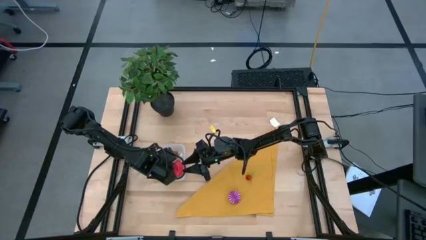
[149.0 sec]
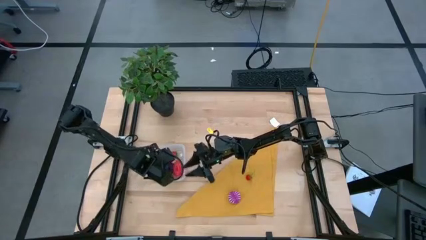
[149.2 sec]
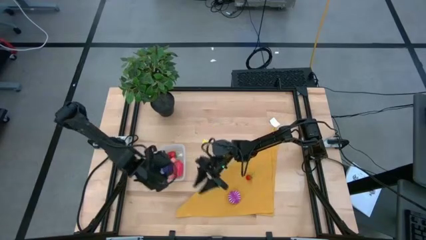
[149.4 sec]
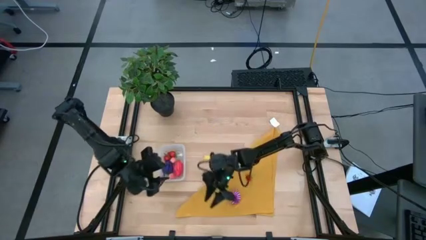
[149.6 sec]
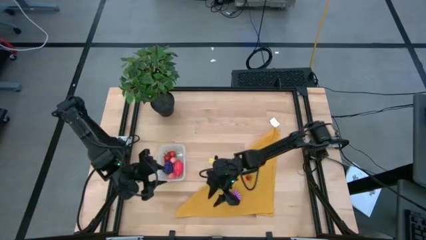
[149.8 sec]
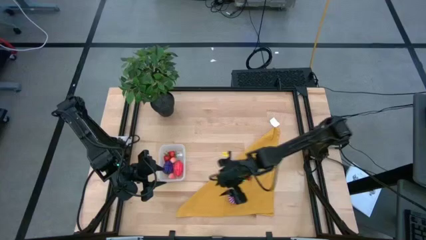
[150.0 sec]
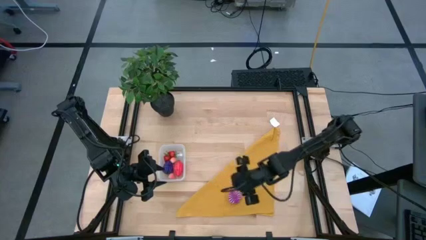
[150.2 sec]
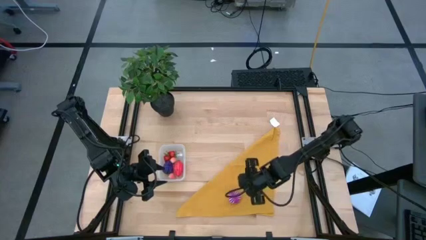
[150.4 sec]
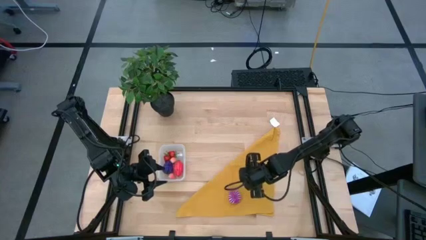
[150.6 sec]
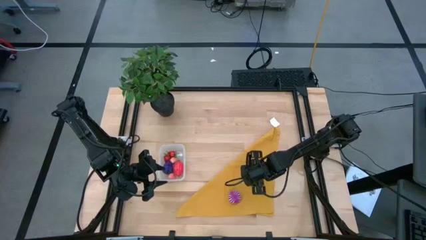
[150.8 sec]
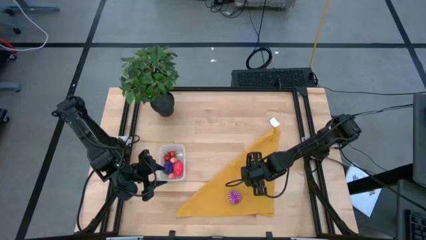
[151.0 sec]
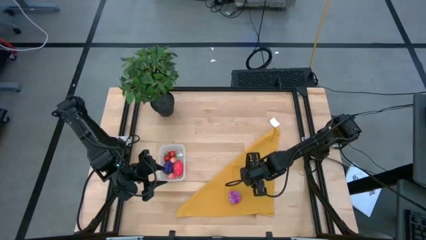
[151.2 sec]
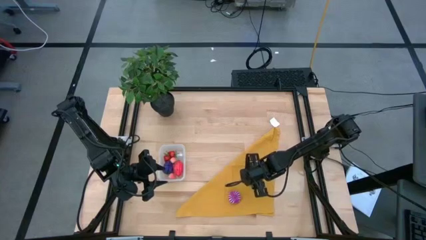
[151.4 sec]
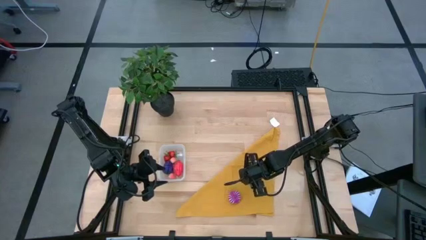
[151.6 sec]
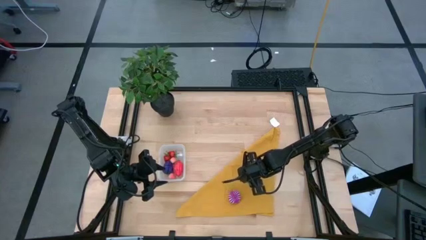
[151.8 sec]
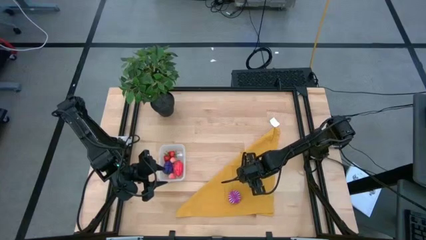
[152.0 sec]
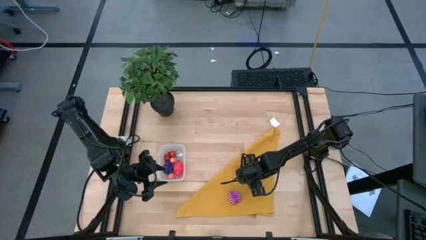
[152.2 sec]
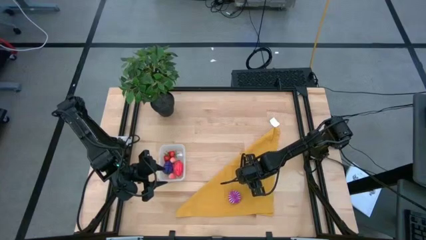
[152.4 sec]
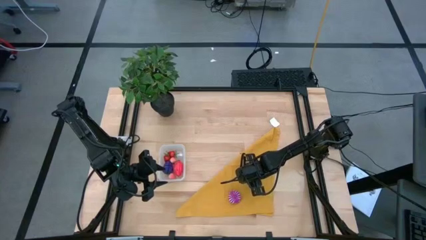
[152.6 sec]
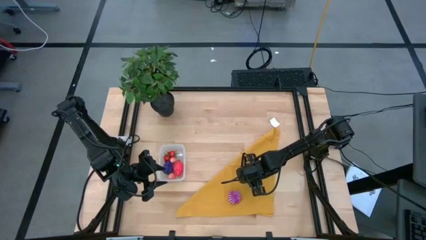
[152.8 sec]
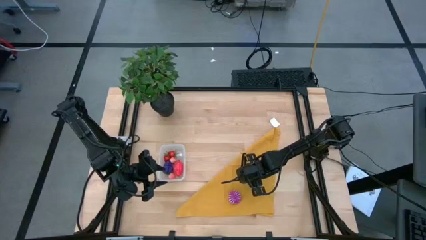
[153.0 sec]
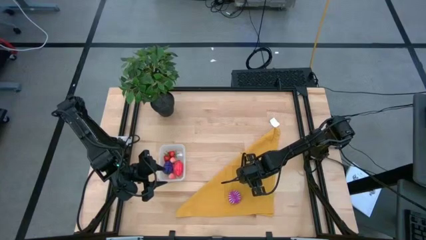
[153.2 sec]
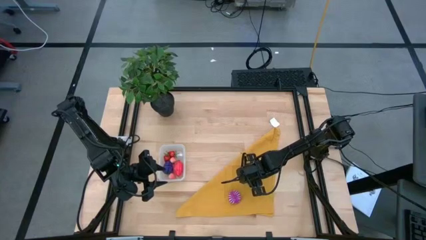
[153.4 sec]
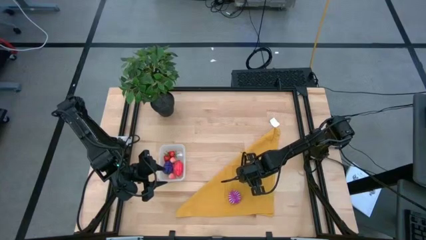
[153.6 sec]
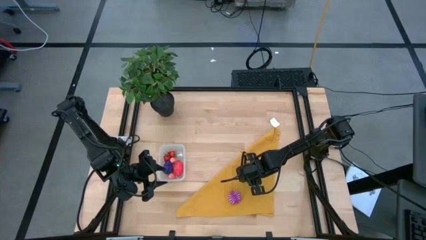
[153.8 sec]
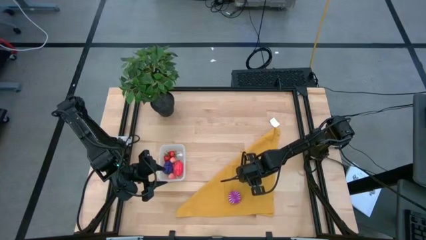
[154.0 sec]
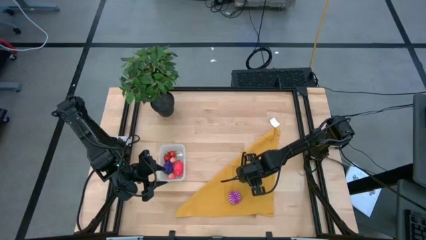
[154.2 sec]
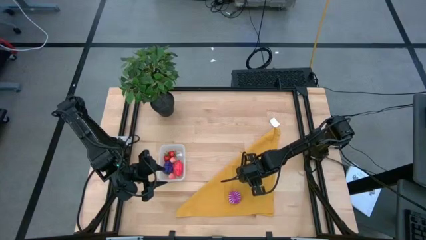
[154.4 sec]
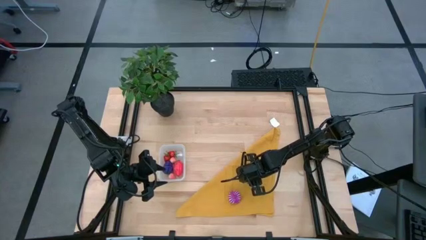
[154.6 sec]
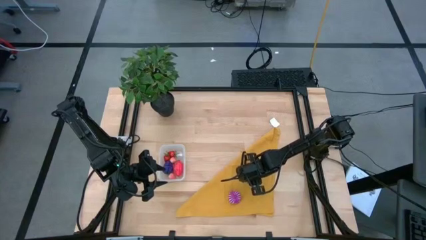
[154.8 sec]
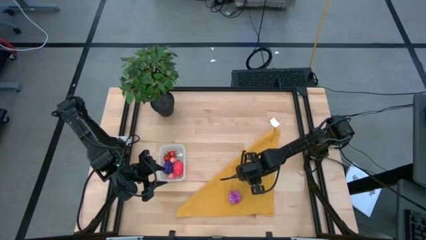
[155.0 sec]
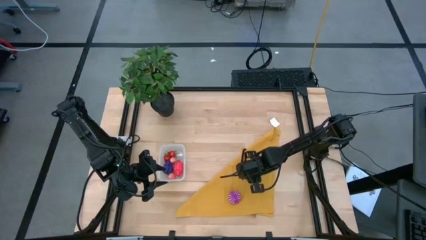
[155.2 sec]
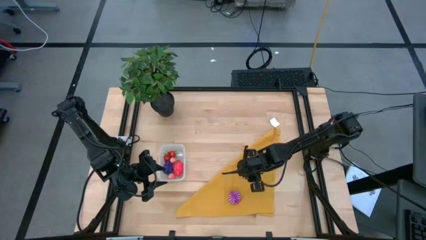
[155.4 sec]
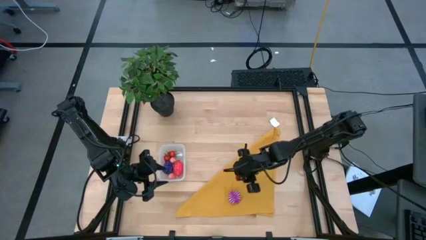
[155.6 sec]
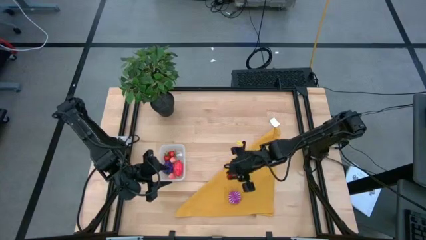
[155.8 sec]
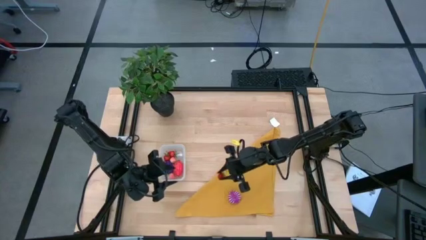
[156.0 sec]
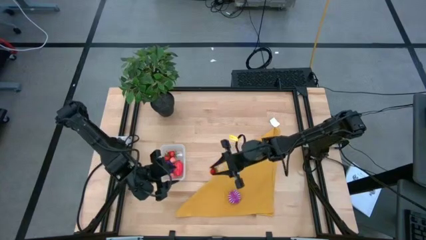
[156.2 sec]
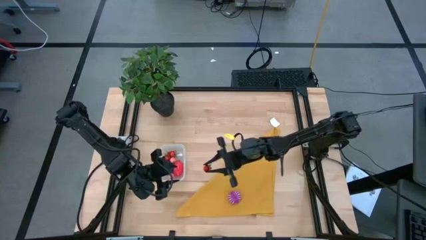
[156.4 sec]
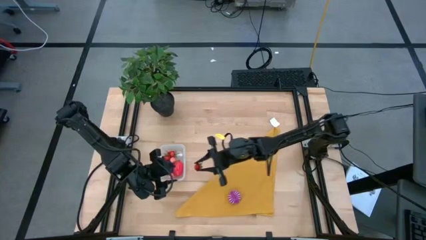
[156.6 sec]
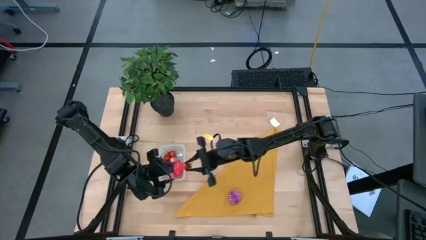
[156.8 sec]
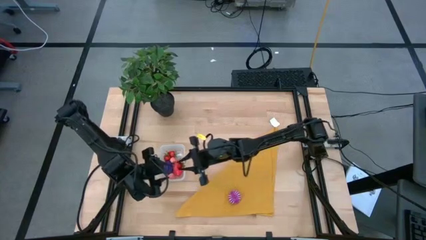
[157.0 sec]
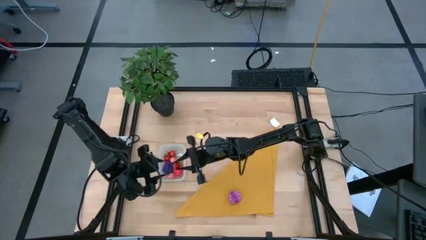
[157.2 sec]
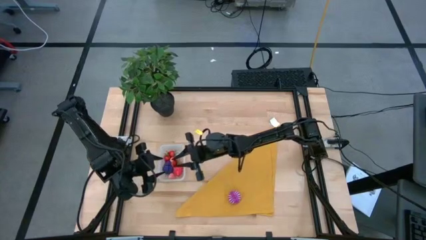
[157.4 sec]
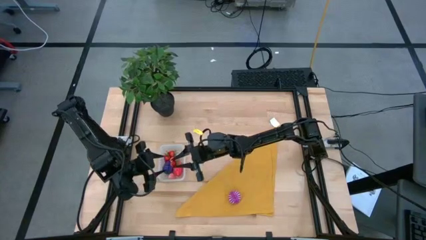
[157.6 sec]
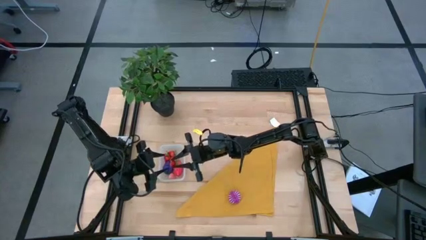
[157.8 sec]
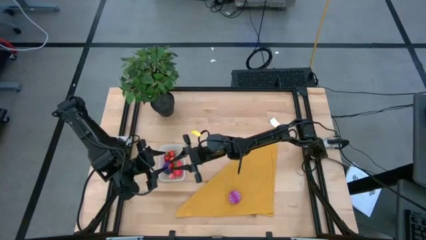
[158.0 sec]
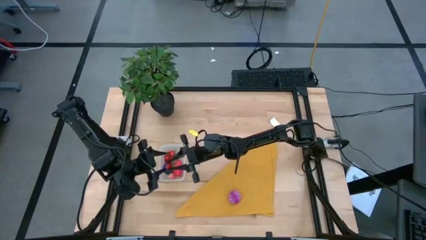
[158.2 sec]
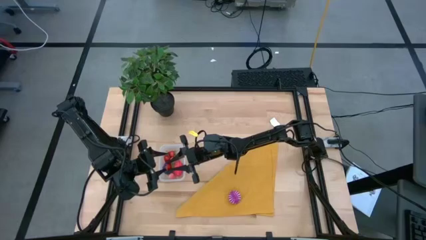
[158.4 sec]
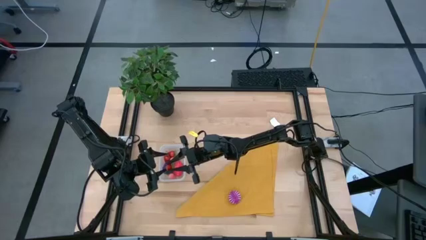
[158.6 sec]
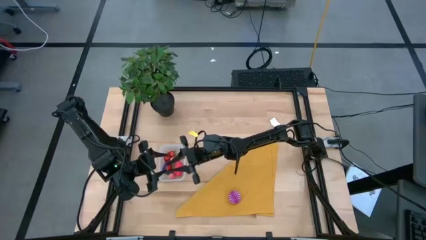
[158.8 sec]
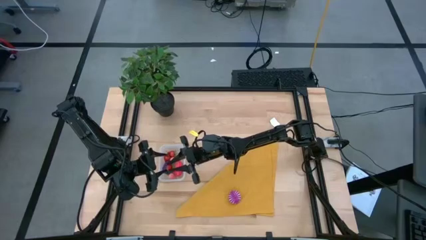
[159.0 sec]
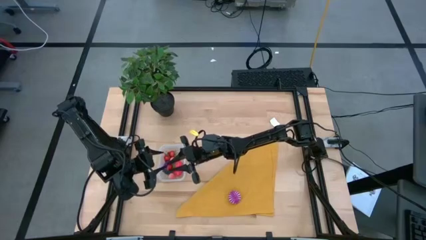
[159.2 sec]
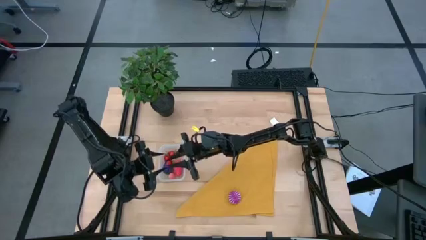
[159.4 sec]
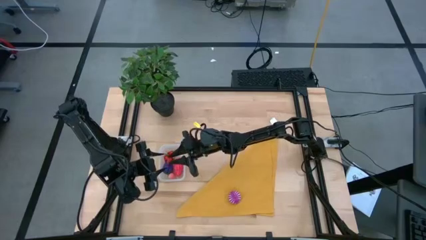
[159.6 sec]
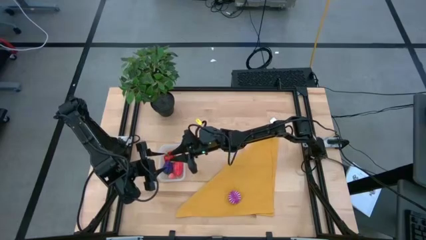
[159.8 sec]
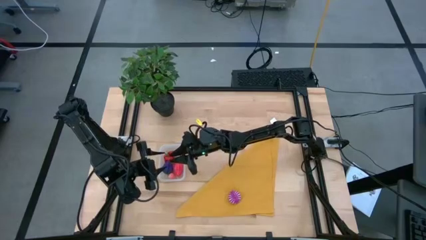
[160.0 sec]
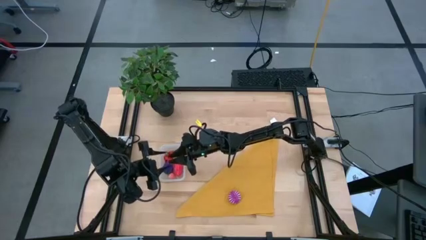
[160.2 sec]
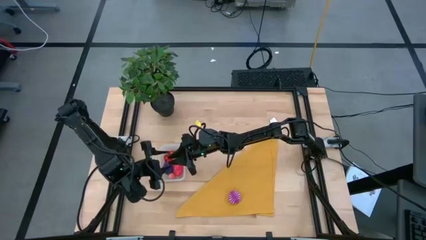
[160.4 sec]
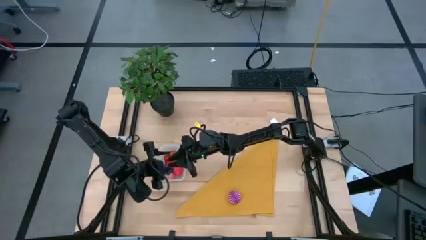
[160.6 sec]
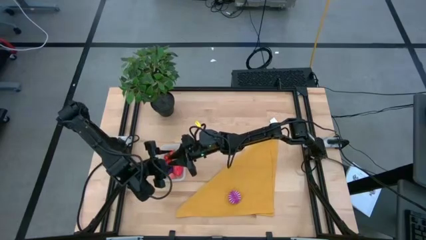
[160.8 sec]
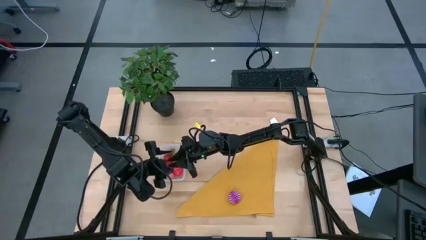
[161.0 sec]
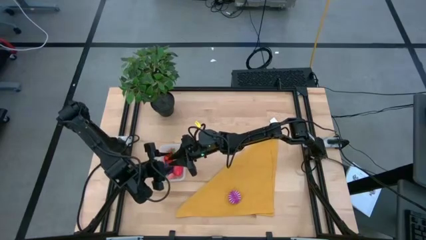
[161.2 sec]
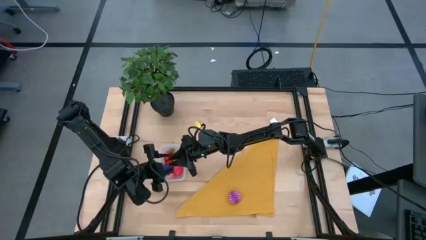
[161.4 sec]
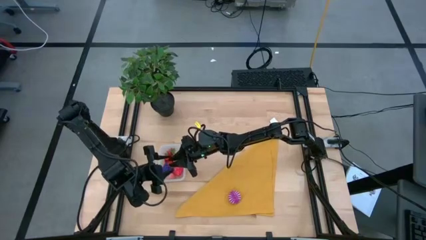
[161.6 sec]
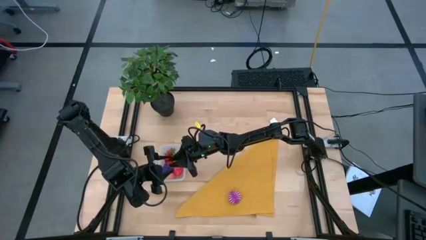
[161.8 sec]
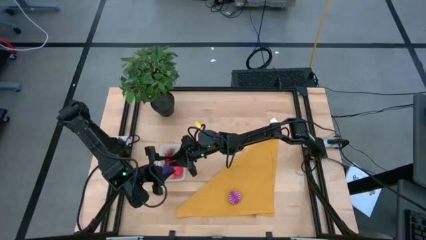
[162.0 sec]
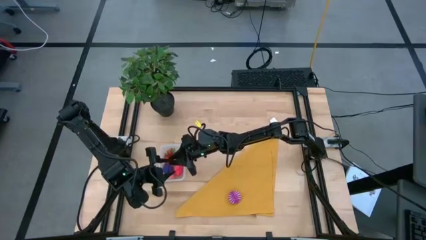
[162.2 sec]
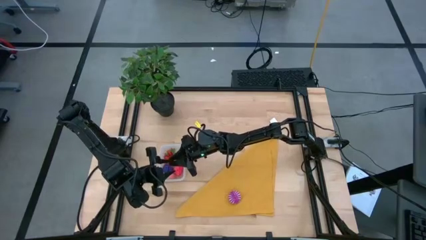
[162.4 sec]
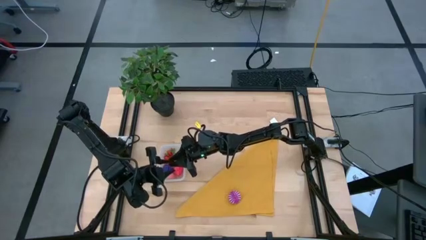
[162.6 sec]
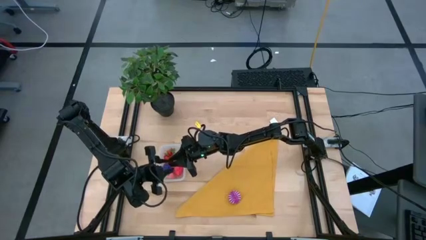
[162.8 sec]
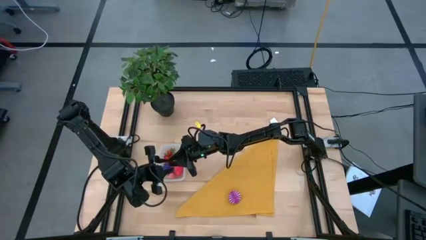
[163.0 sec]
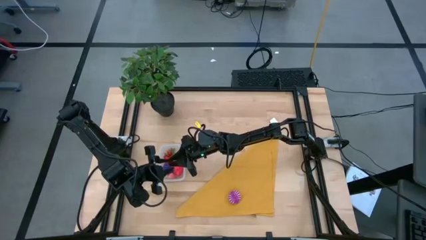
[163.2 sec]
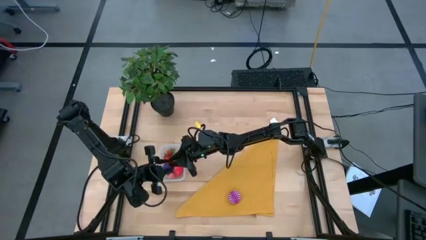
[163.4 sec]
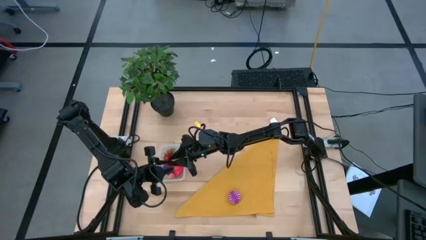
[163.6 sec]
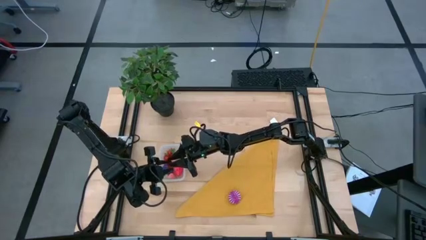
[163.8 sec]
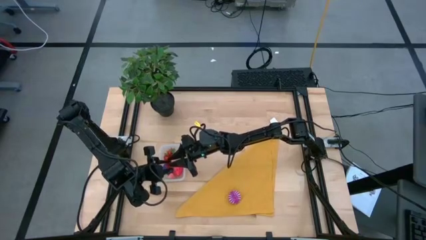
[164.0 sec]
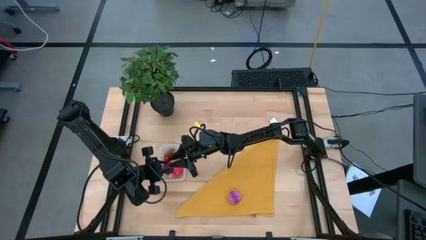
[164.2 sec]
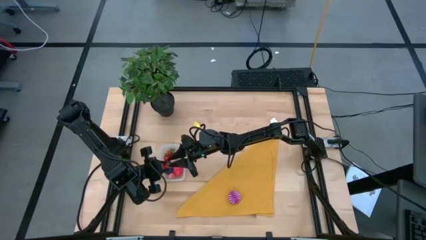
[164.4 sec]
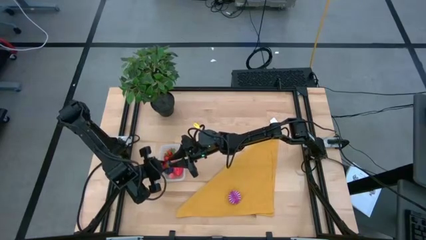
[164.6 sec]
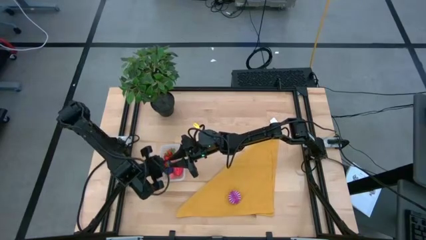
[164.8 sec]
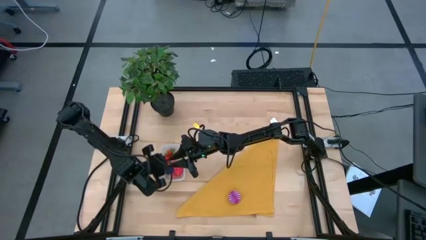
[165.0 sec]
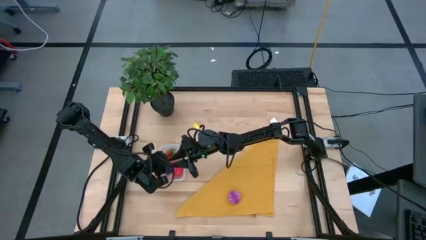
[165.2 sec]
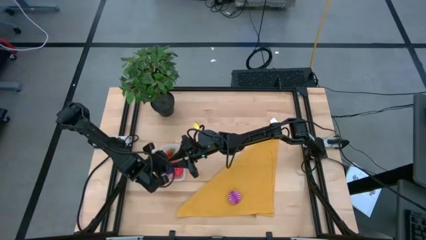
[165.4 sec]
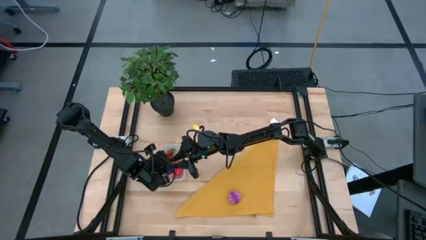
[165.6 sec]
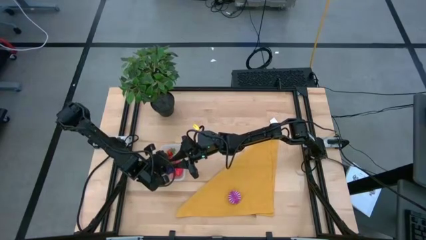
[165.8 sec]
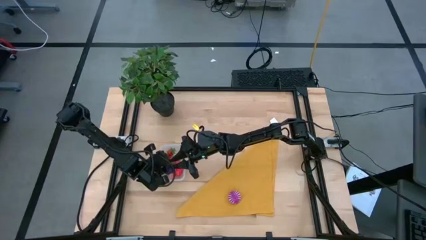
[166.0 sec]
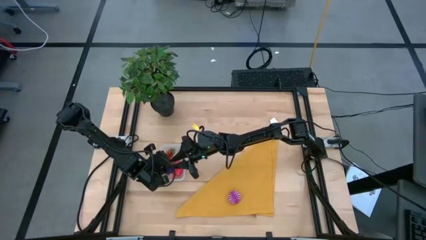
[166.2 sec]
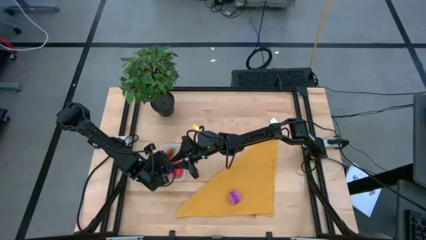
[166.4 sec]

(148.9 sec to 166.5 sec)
Task: Pick and placing Produce into tupperware
Put the red strawberry into the transparent bin
